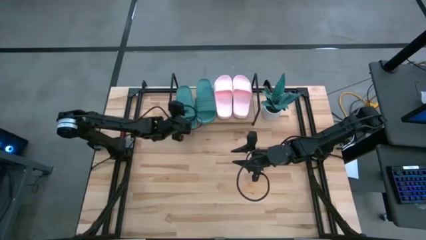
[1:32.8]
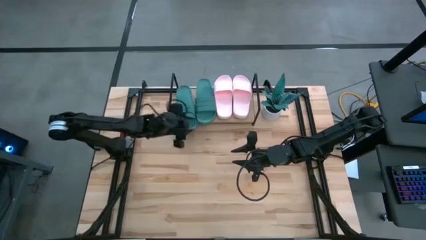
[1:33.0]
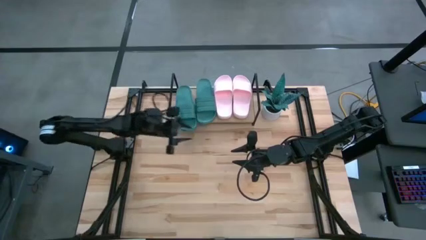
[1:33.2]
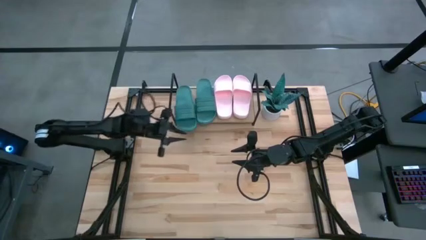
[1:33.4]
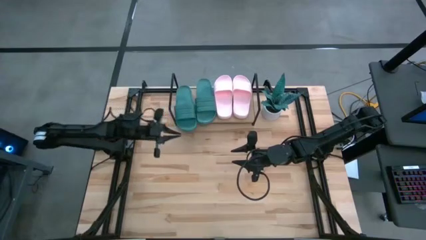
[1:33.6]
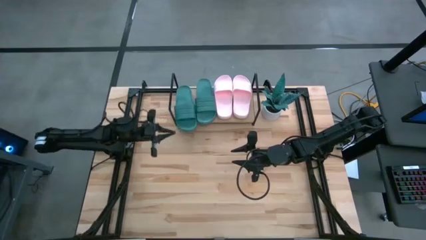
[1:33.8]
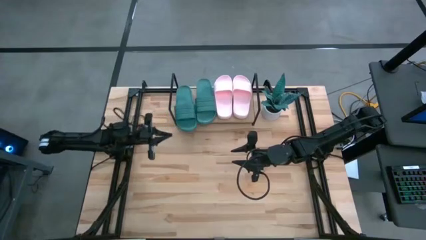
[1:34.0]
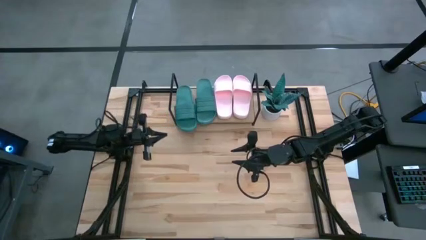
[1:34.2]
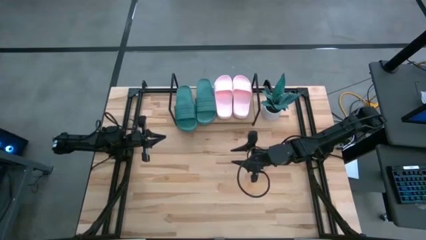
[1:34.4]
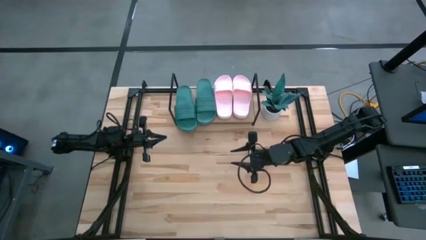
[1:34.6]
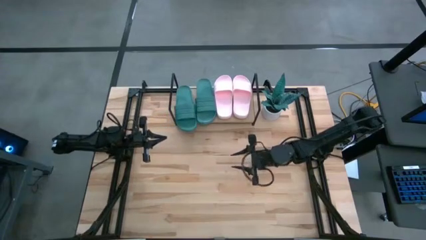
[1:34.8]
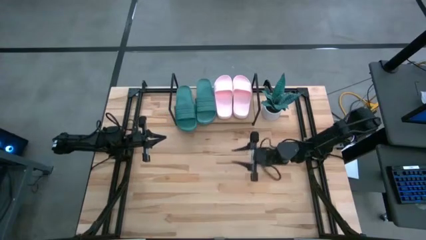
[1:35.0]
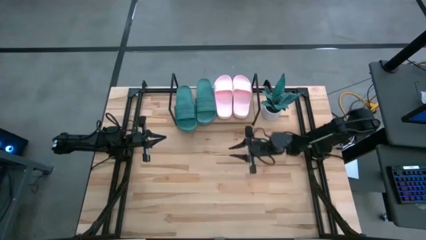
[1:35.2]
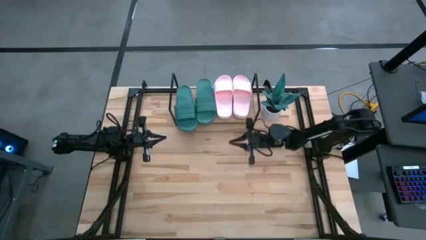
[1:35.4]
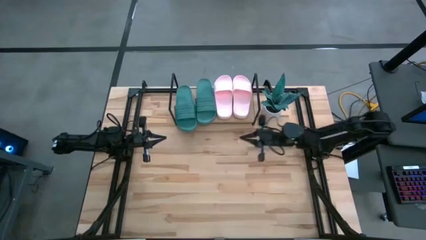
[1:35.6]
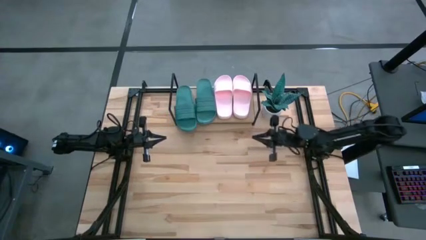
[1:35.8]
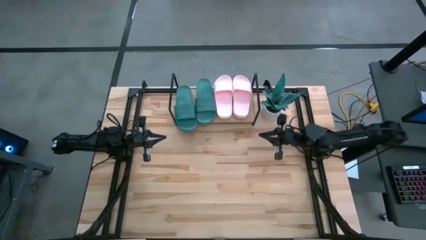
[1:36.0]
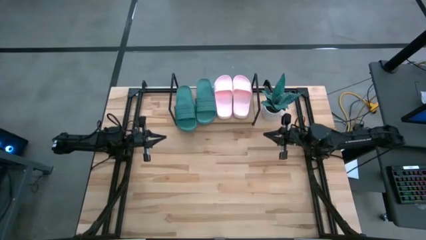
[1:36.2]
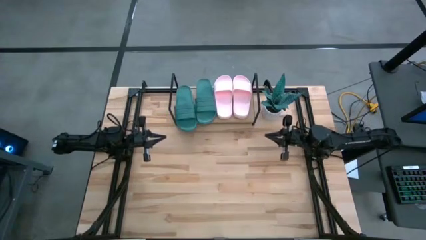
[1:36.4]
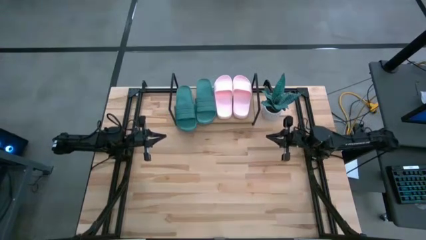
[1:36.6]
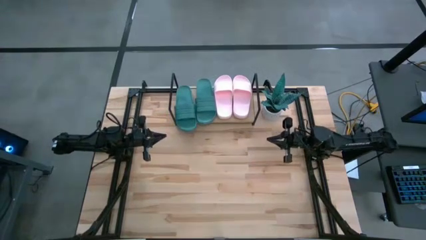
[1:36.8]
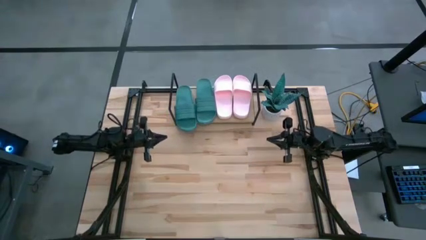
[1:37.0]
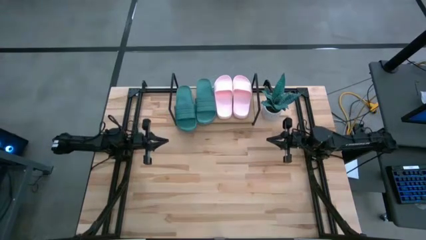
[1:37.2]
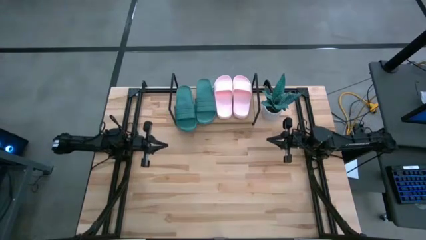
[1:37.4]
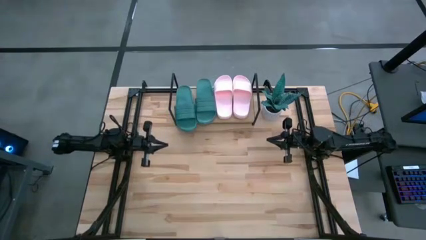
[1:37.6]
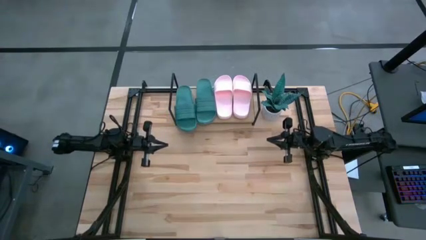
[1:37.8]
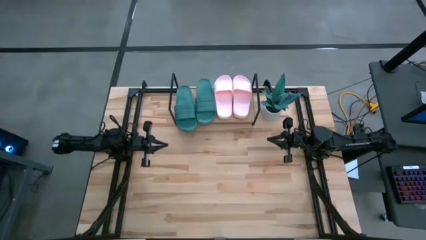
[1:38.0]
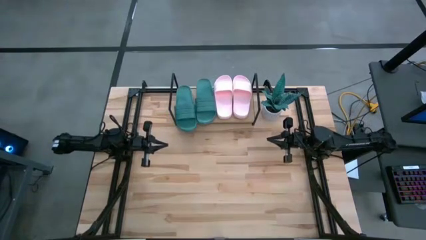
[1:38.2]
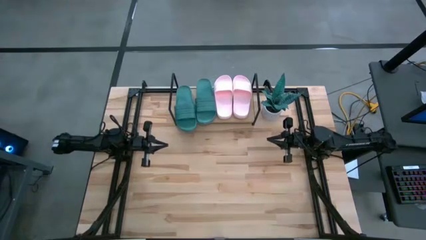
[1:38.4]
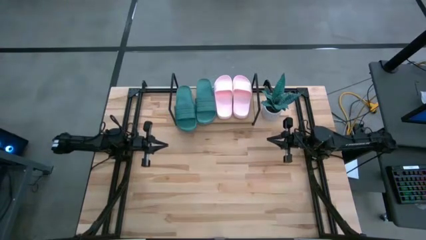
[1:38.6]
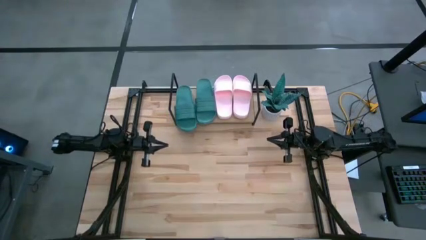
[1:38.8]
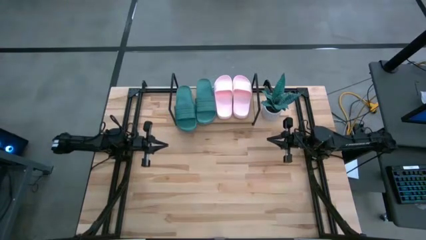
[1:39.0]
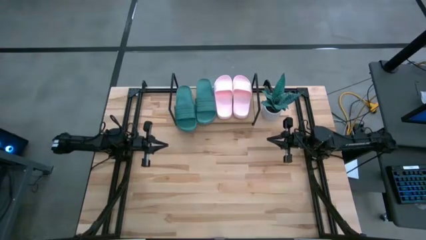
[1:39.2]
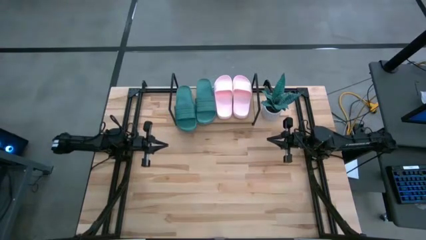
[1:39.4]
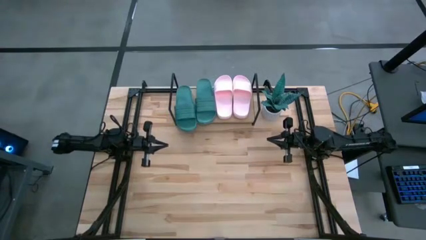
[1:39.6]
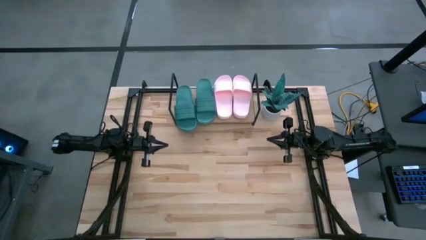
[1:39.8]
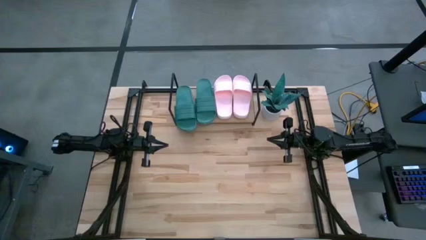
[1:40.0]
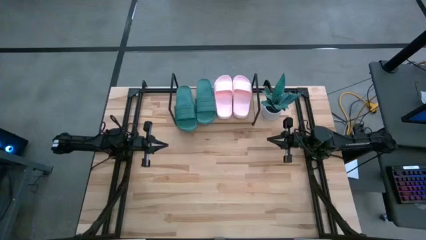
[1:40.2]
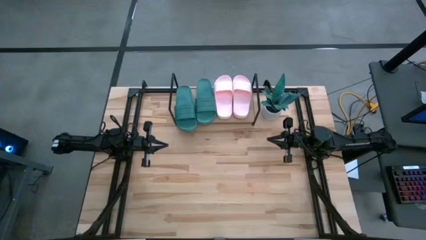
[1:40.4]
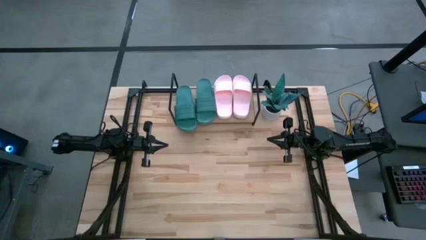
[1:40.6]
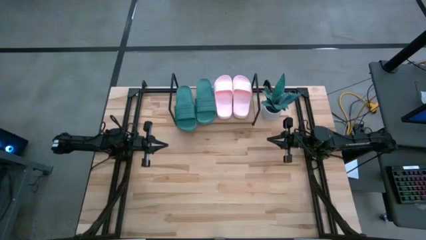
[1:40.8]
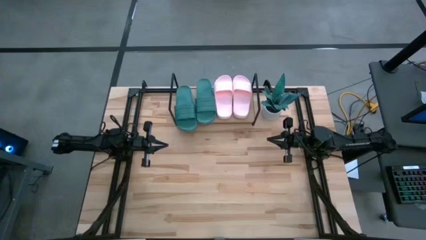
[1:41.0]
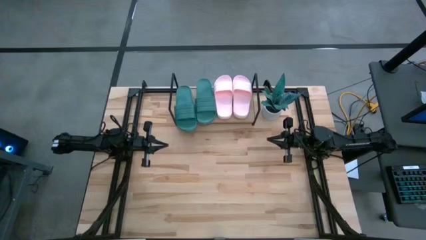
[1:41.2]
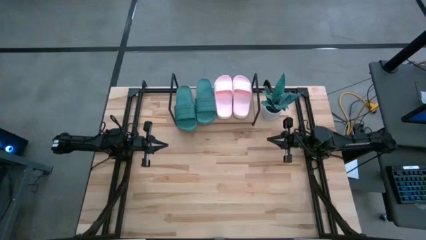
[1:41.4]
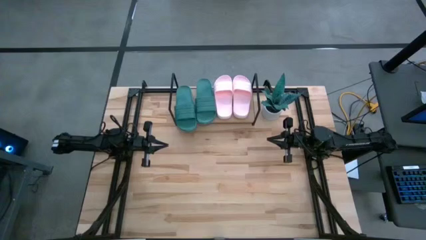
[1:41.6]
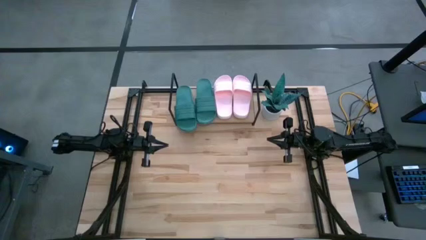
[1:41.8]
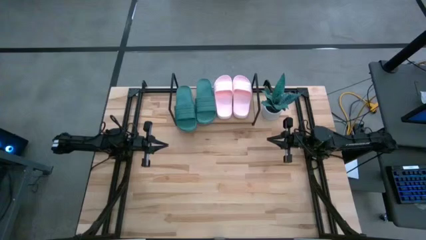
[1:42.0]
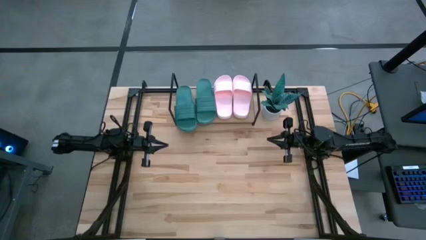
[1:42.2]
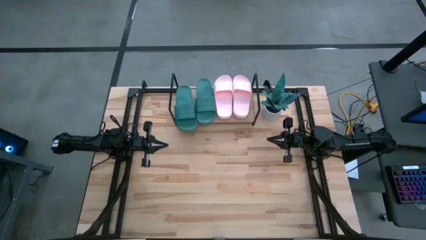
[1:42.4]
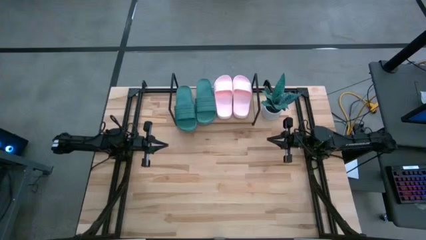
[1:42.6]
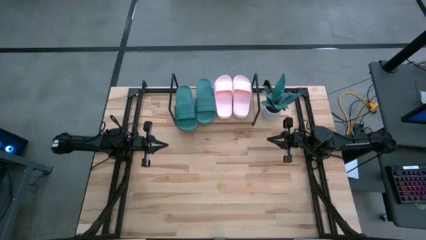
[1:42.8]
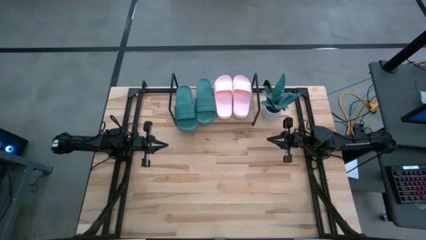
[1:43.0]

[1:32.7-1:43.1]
Task: Pick and place slides into the shelf
Return to Home Position
